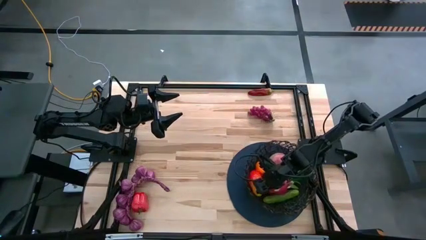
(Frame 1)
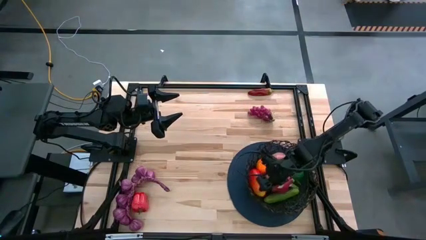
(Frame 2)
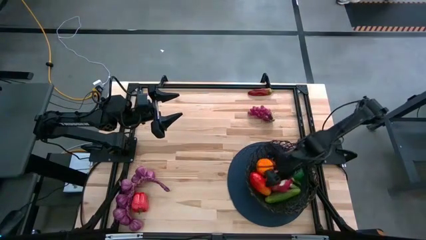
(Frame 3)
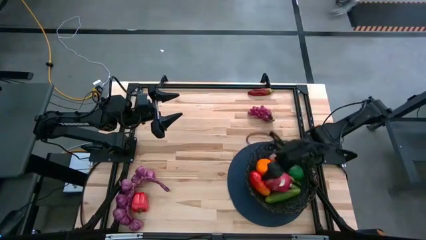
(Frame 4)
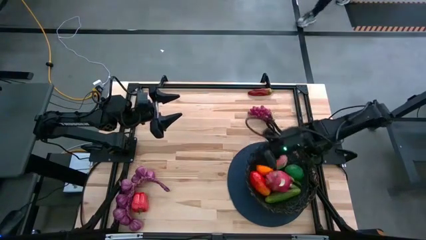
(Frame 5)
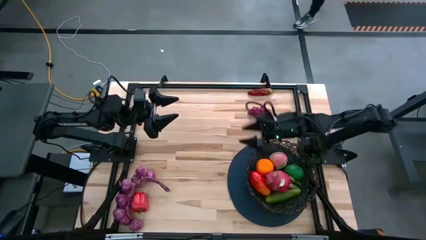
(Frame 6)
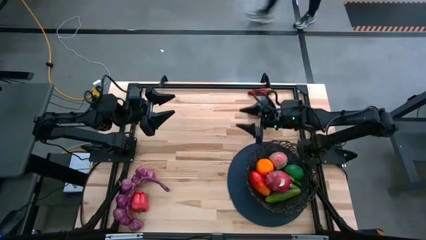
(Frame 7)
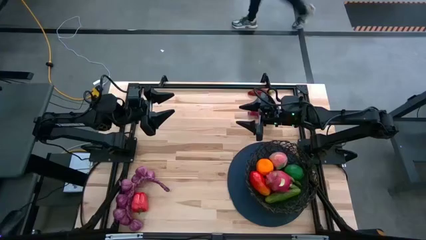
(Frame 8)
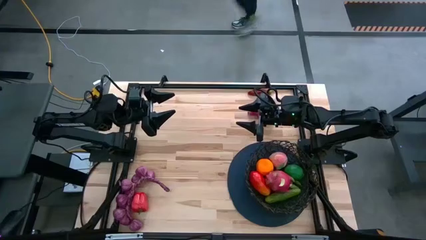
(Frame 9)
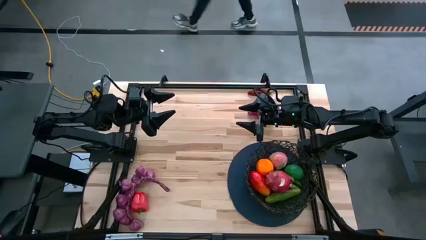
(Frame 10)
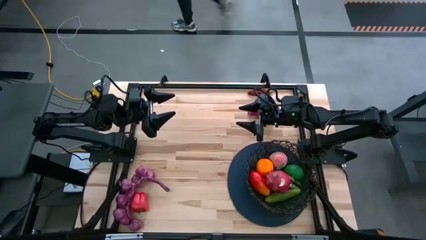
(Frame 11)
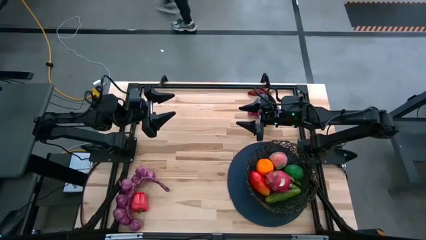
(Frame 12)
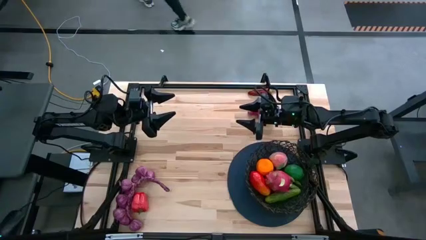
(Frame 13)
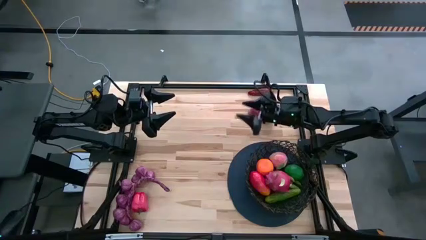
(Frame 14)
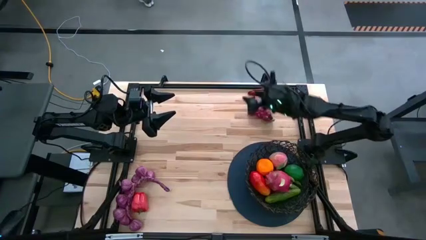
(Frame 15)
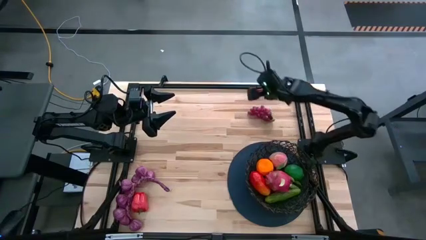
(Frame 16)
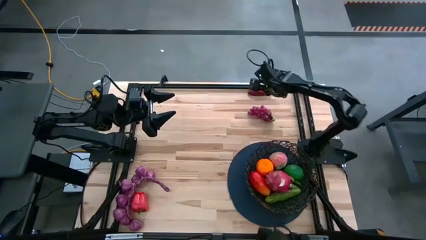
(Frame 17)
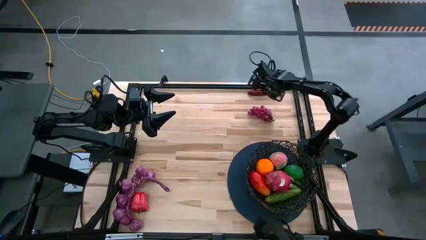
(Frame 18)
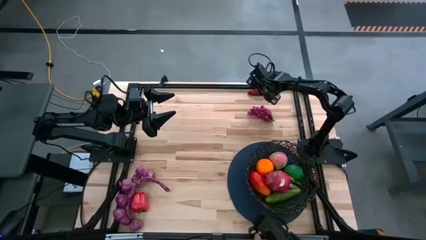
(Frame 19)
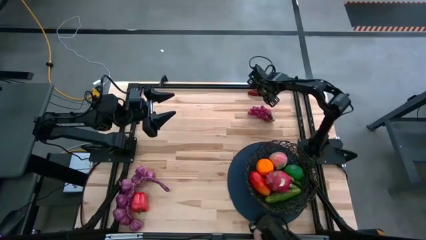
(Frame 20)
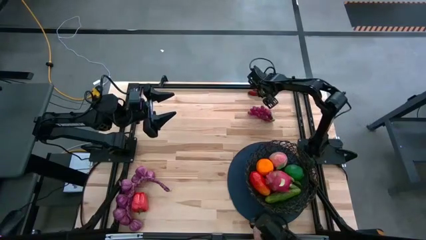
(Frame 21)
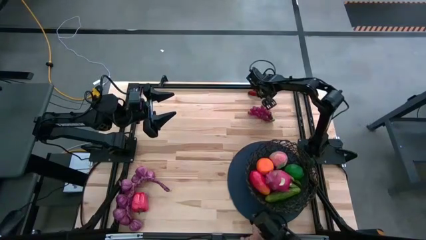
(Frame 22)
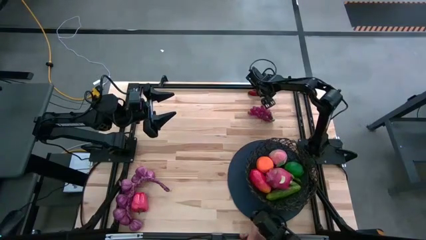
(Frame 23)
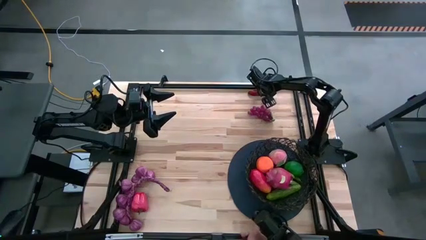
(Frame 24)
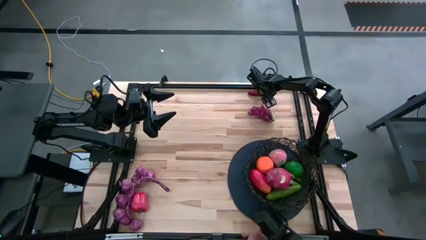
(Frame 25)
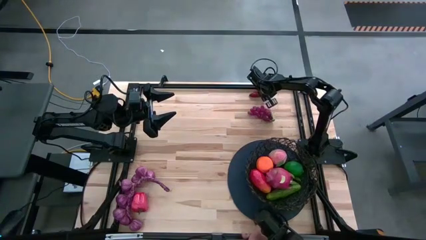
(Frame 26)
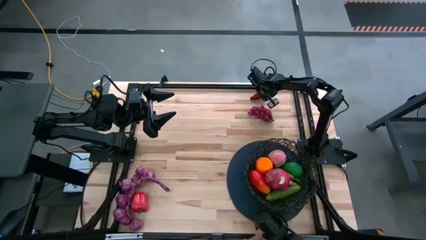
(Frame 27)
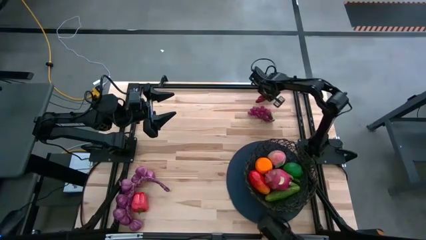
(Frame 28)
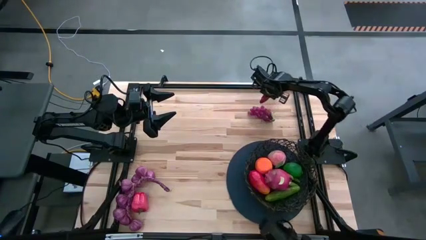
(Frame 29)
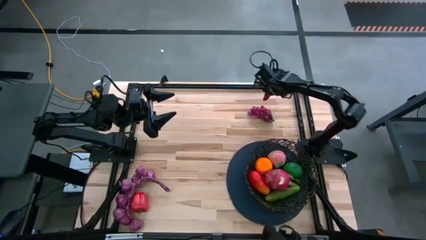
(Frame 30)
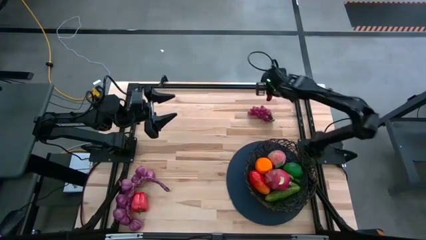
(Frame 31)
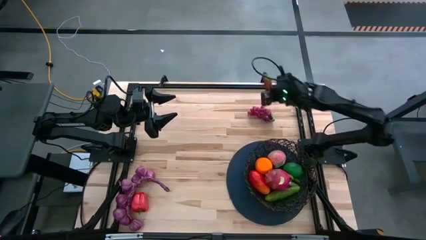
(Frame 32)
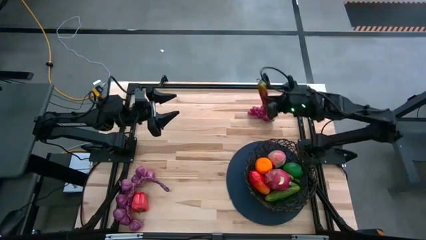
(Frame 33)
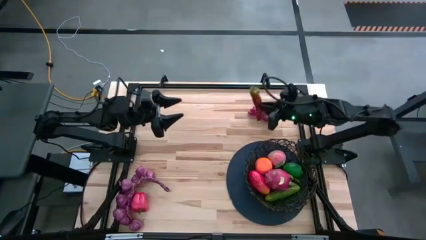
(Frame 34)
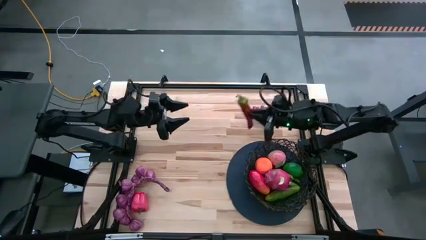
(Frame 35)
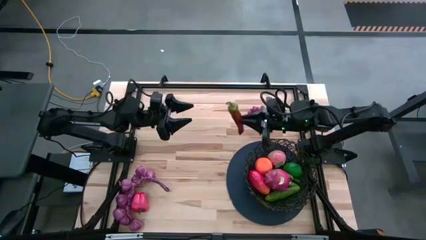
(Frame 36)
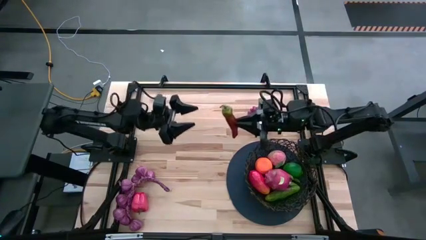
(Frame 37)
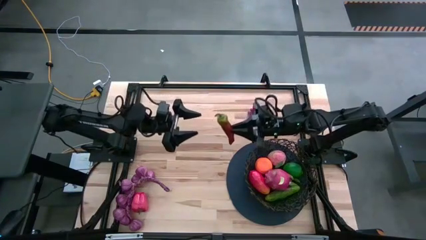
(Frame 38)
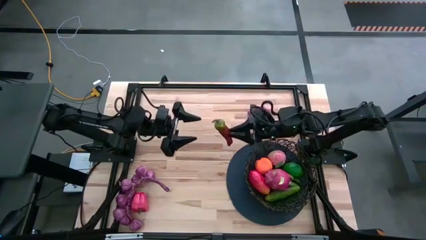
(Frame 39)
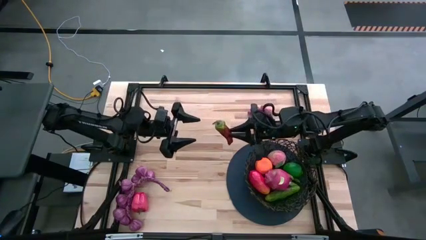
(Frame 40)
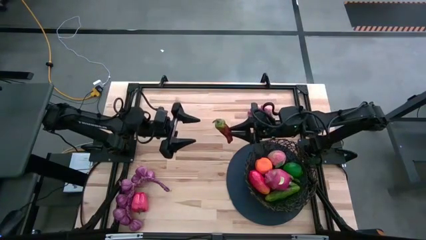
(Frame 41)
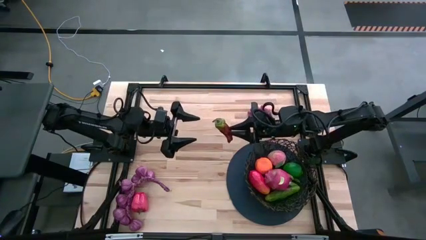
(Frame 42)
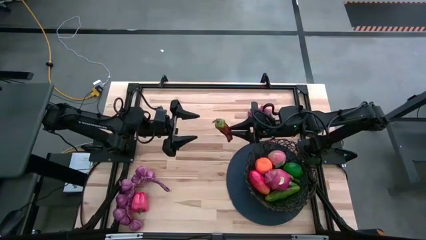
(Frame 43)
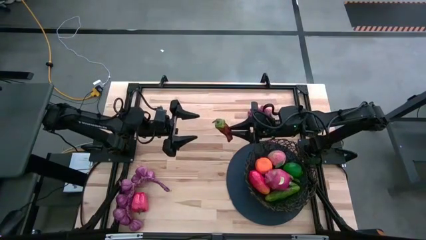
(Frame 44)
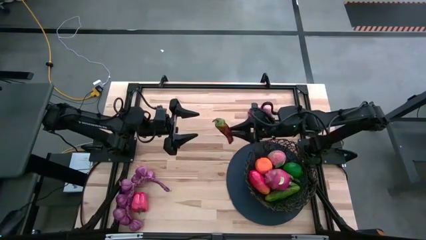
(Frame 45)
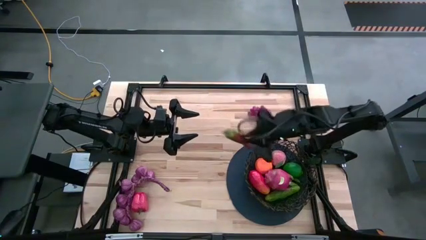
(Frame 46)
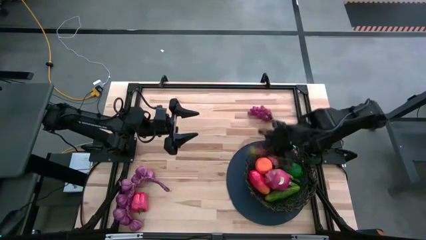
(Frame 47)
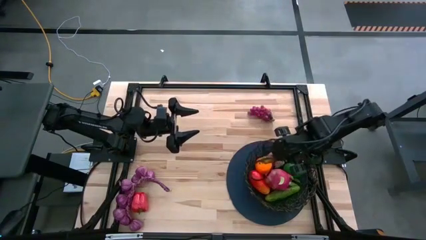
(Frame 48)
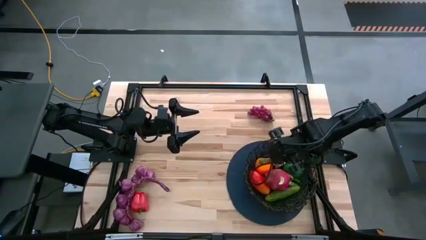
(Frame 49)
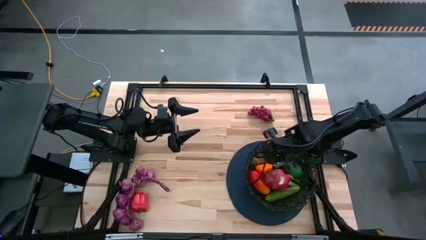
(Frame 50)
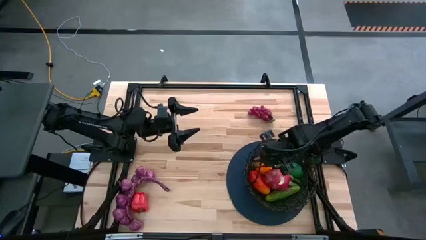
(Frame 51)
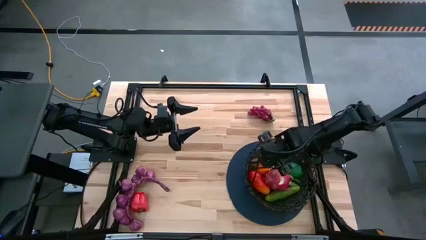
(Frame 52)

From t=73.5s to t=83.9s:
Task: Build produce basket
Put the red chili pepper into the basket
